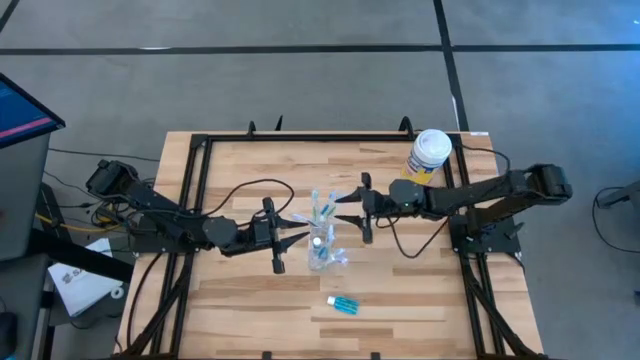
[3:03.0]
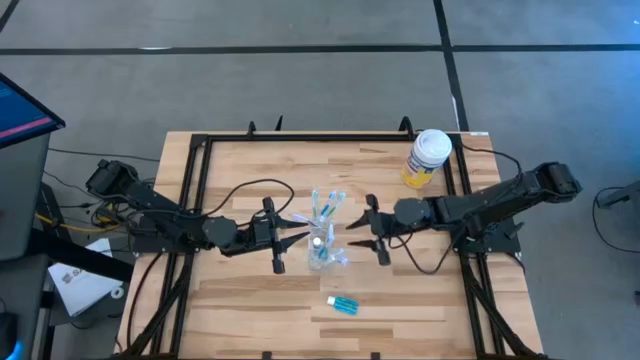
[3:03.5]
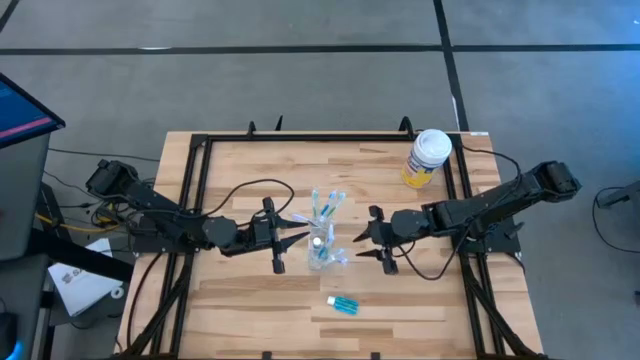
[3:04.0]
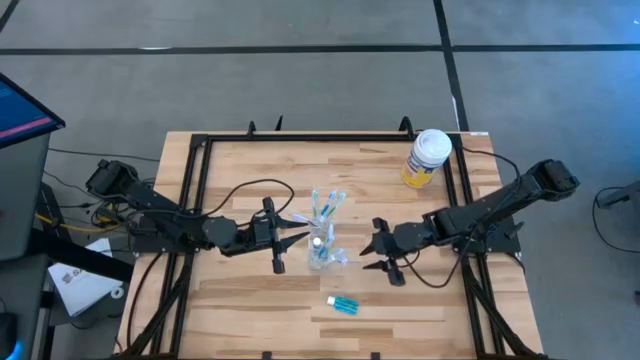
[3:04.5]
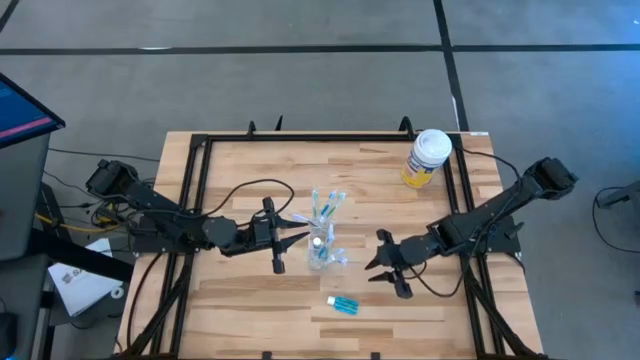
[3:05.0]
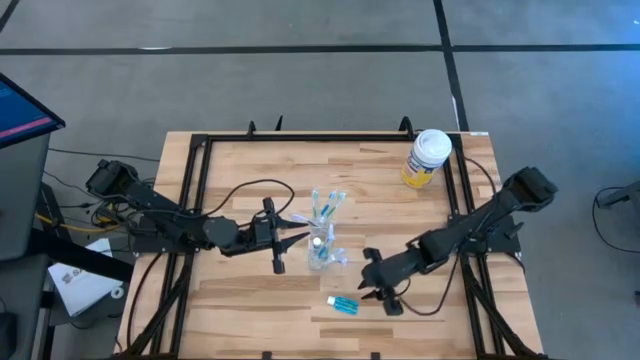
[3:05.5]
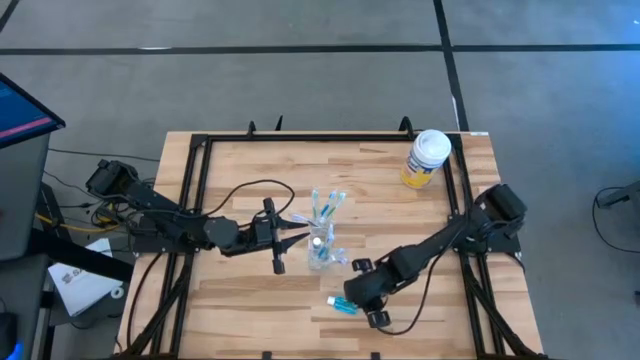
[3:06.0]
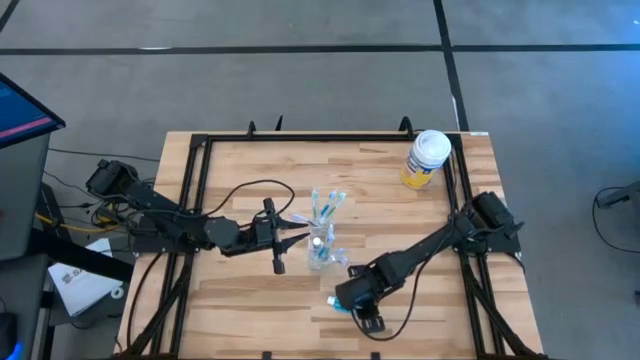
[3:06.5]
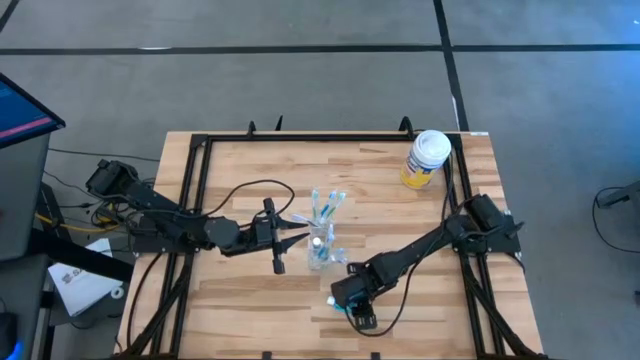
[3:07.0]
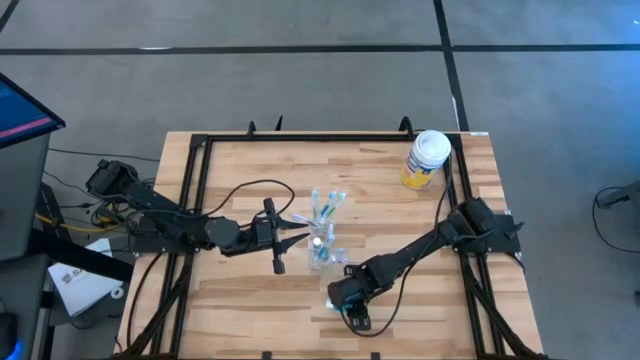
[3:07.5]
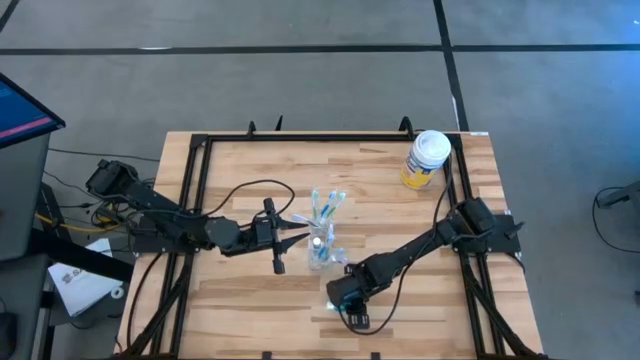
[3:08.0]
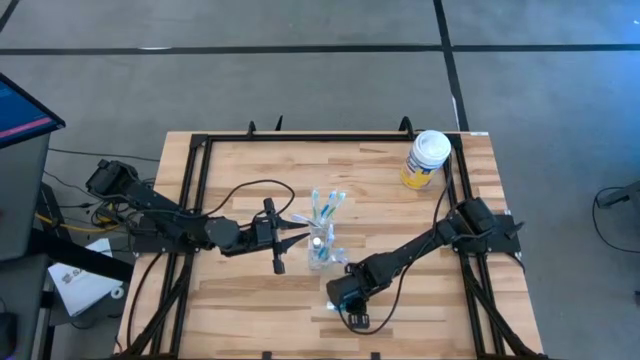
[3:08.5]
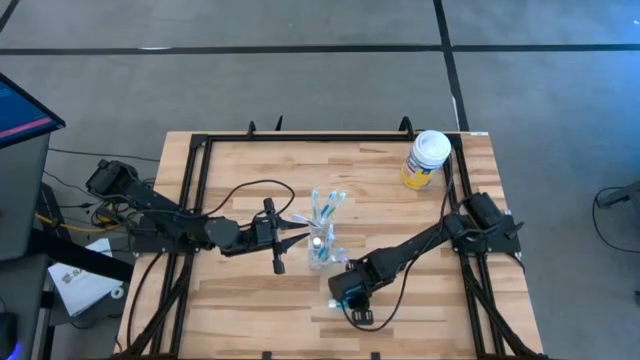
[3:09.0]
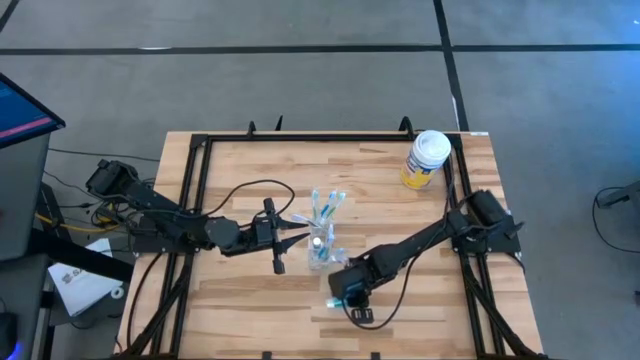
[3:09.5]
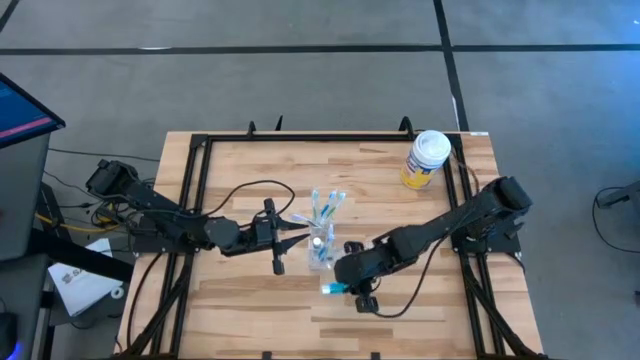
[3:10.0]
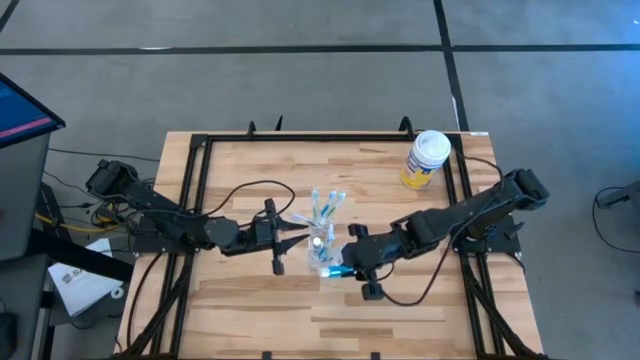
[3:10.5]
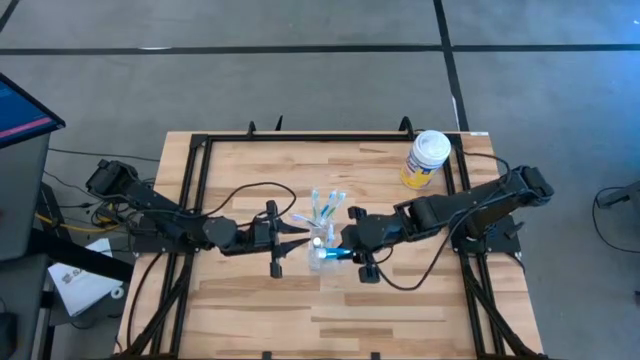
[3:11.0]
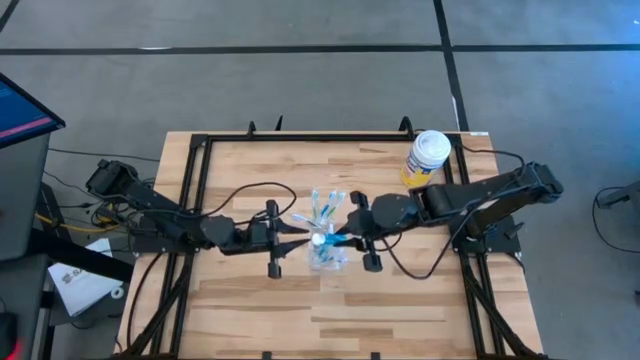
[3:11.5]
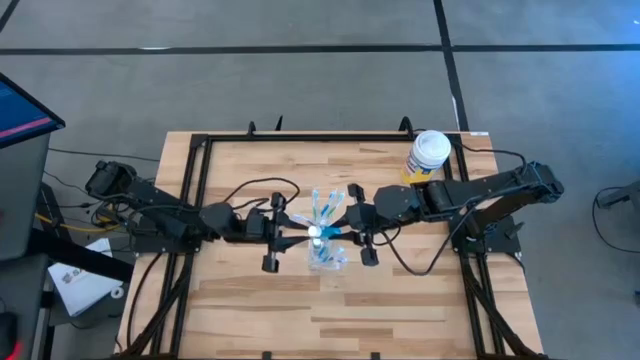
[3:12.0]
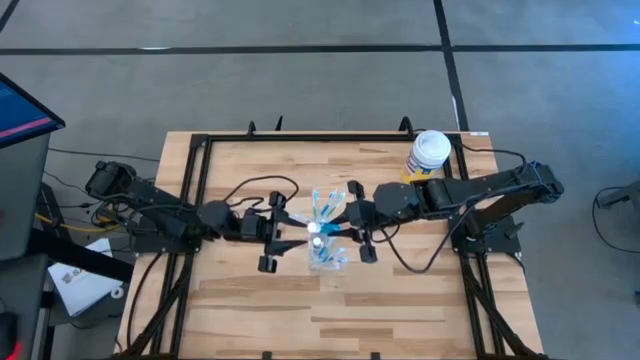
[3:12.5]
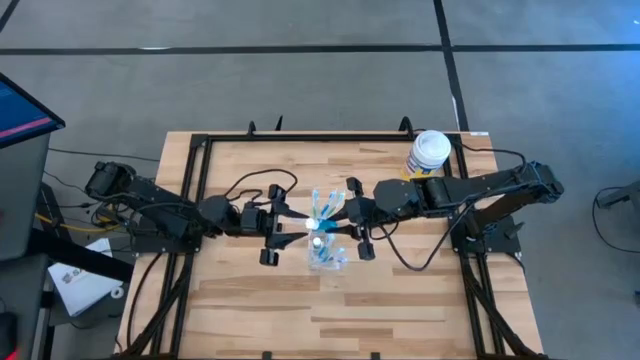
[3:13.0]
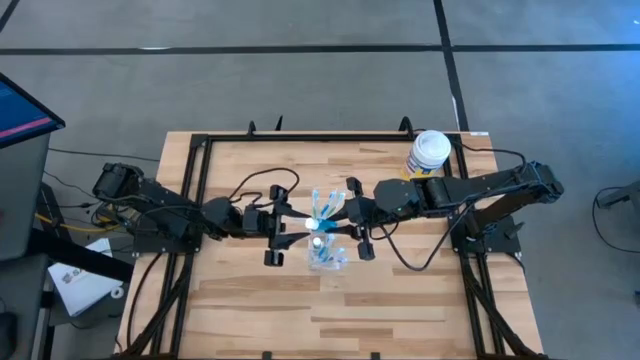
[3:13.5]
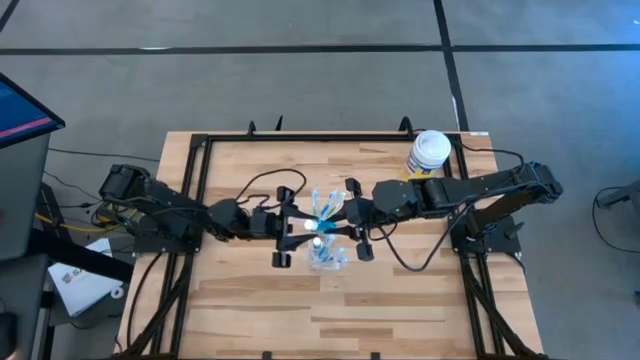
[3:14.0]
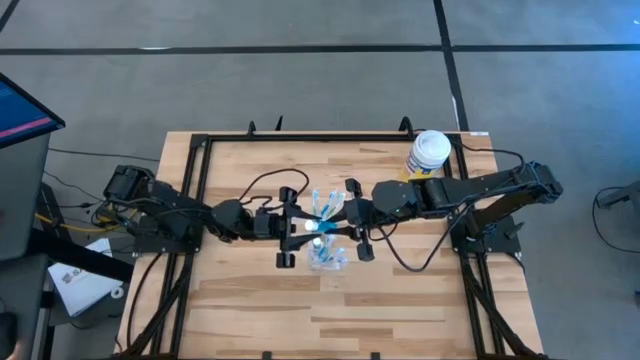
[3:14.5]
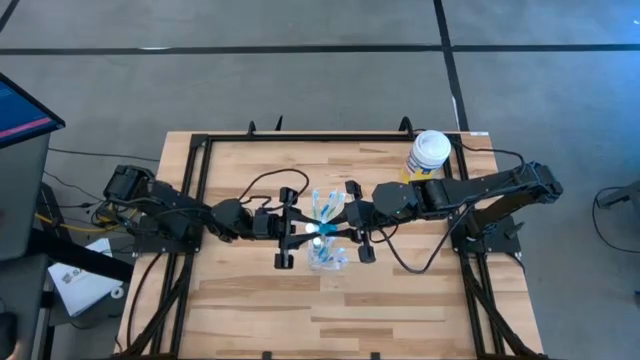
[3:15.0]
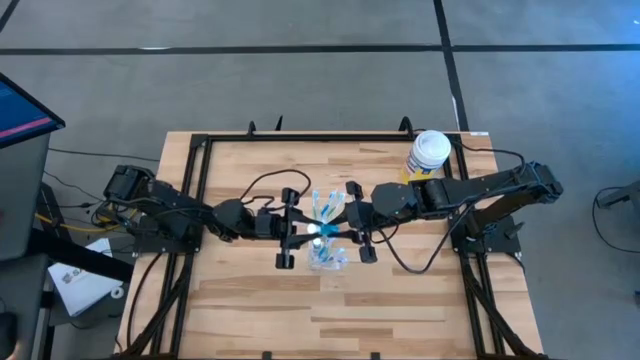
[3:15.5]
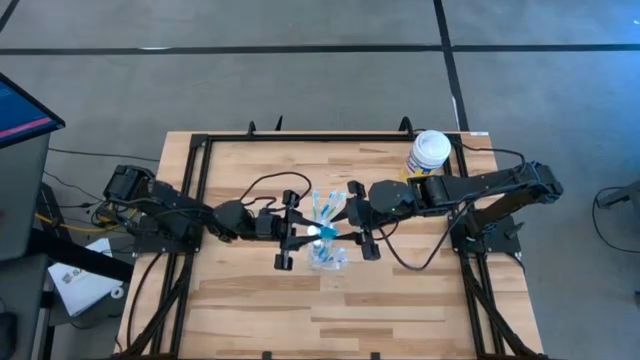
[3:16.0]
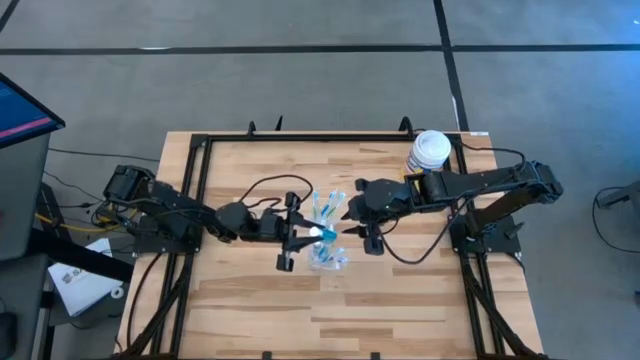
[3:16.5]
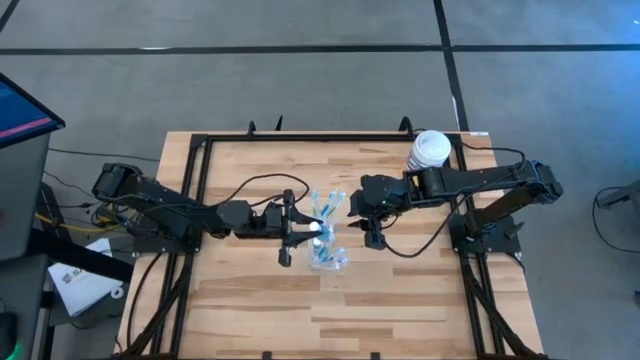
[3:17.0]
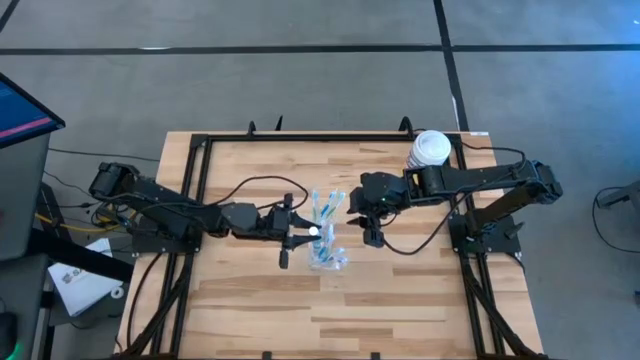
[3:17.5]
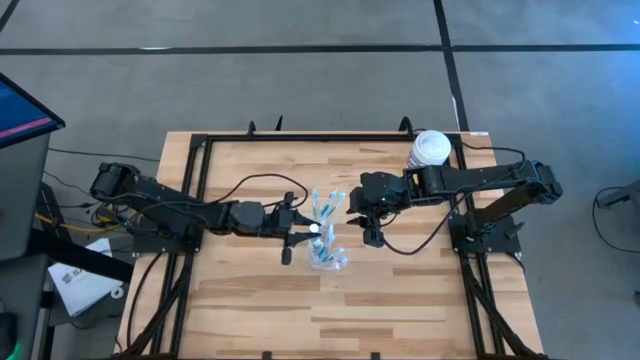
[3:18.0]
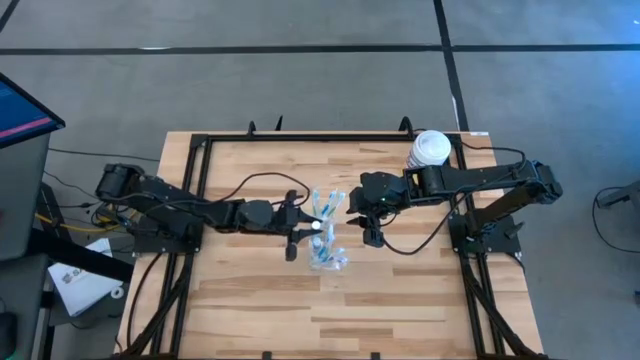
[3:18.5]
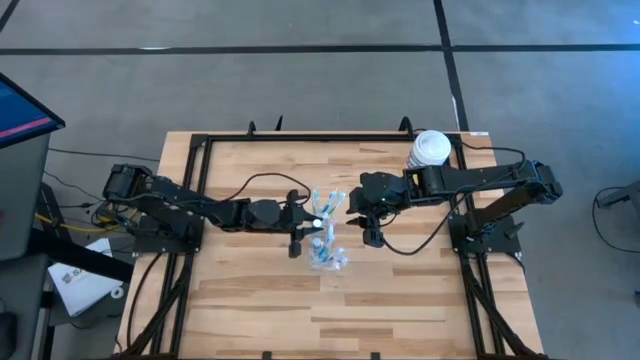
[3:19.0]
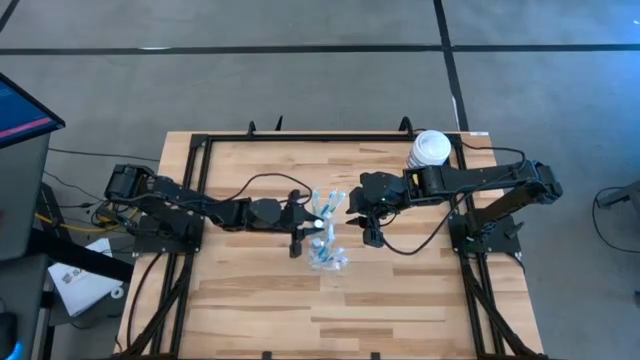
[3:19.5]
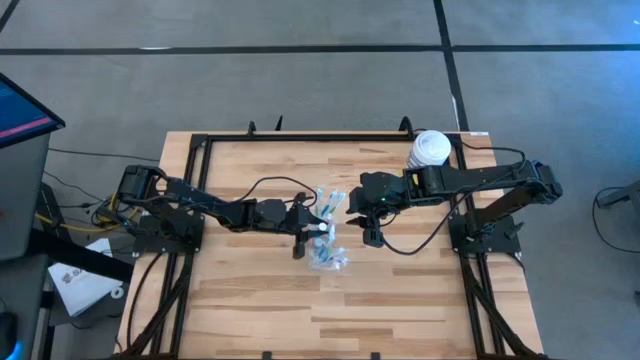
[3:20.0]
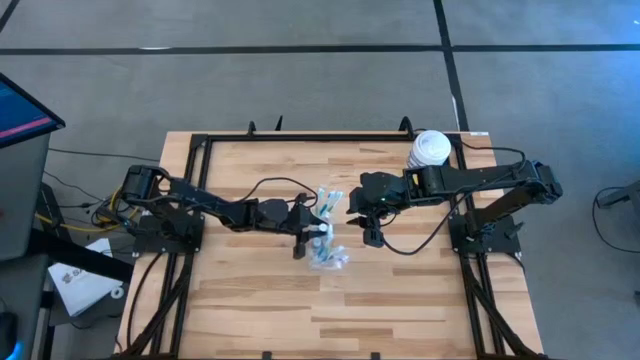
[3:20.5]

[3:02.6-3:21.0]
Task: Pick & Place toothbrushing station
Put the blue mouthwash into the transparent organizer

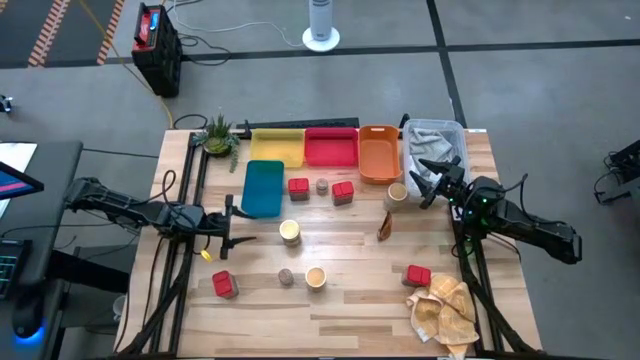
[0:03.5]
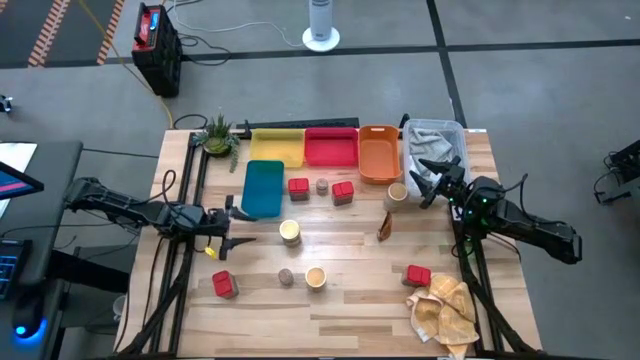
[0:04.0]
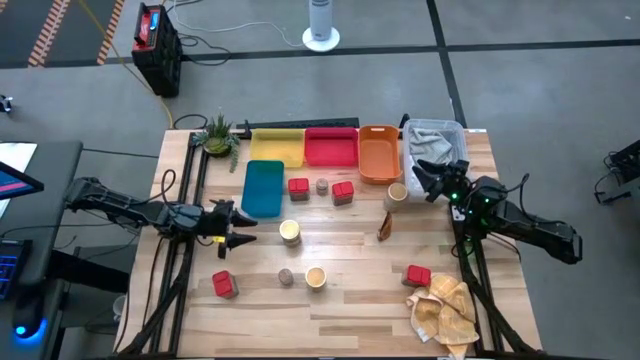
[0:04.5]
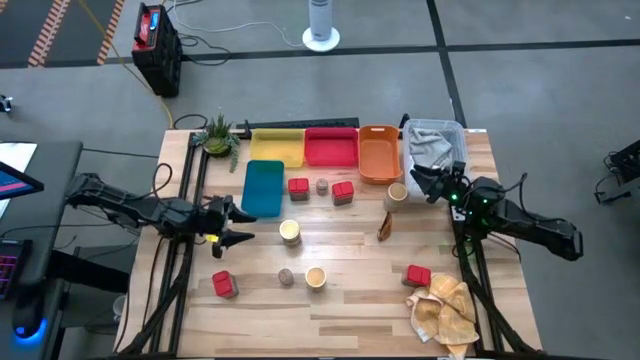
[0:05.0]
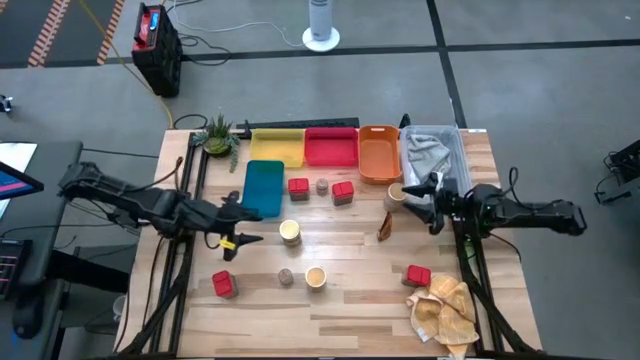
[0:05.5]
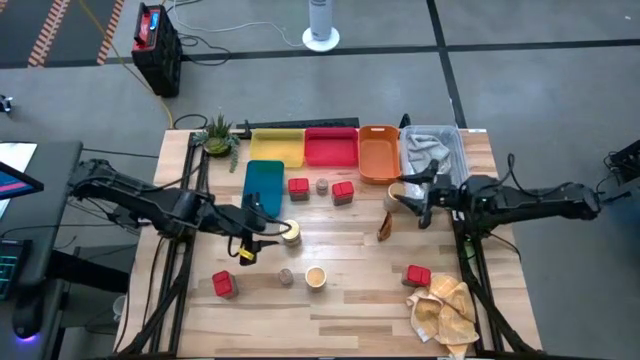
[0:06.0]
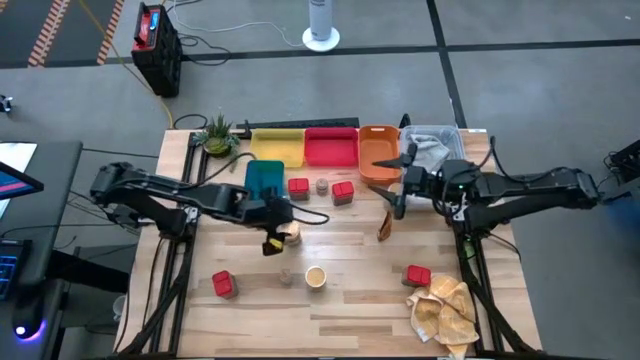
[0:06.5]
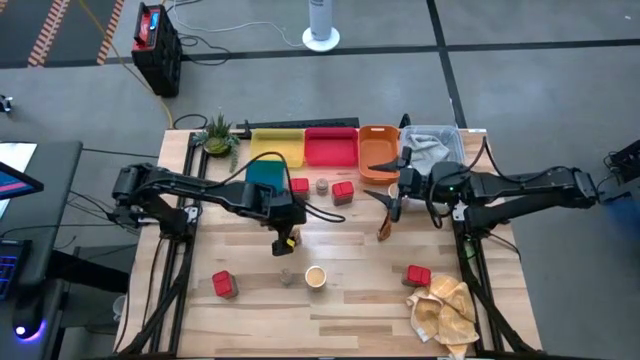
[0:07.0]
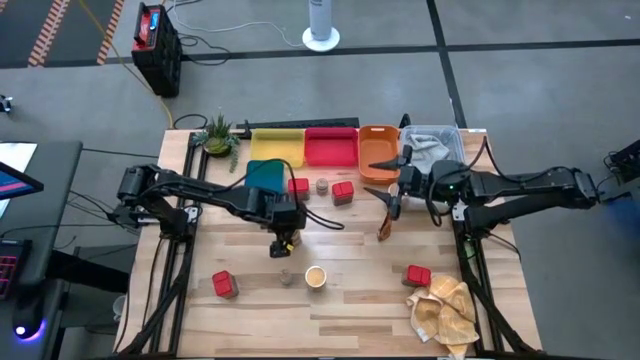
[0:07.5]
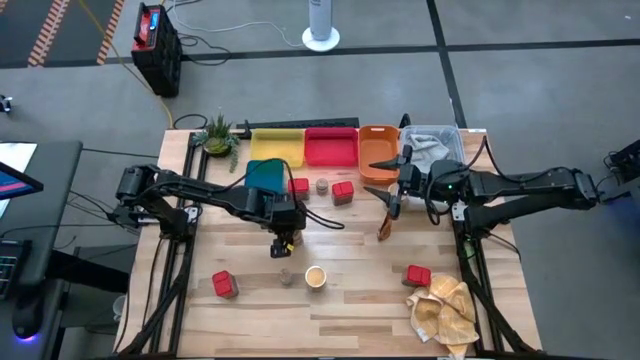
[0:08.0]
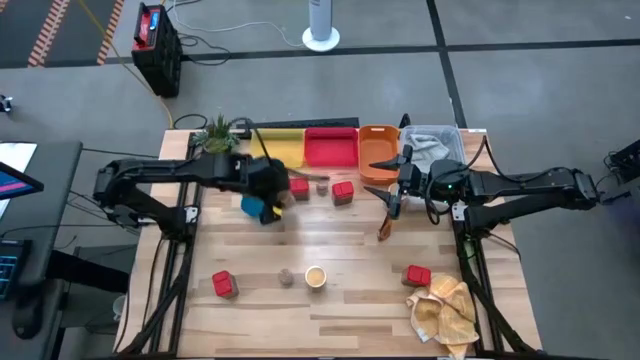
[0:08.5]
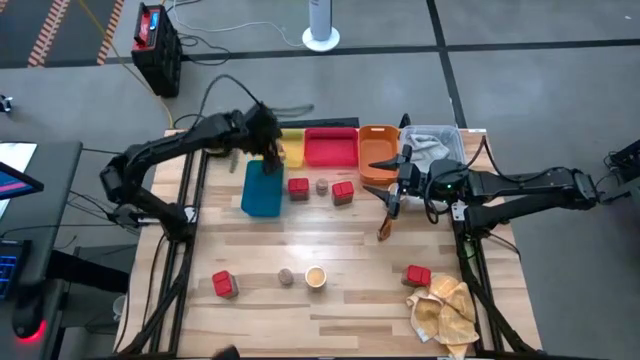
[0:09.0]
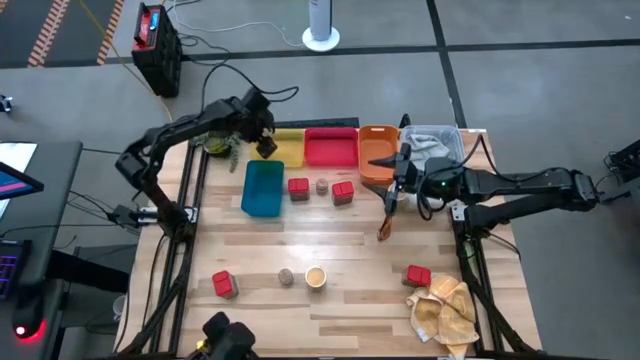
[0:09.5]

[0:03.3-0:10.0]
Task: Sort spices by type
Put the center golden seasoning bottle into the yellow bin
